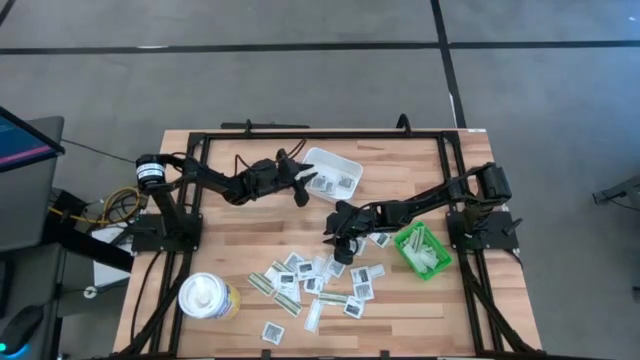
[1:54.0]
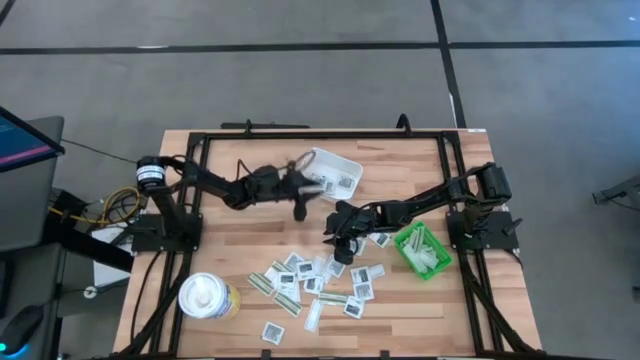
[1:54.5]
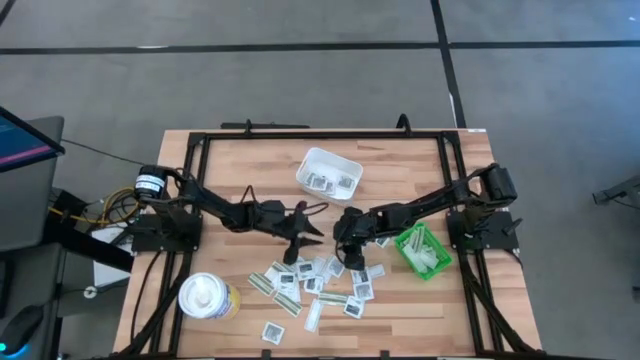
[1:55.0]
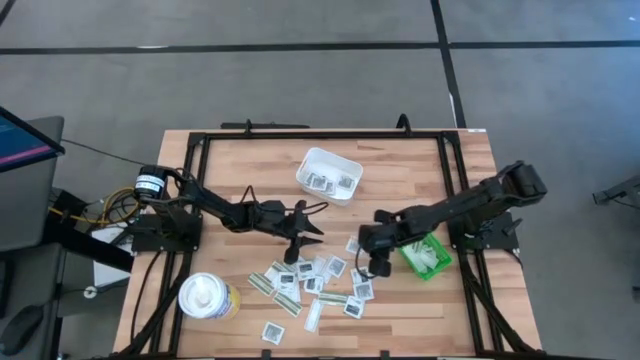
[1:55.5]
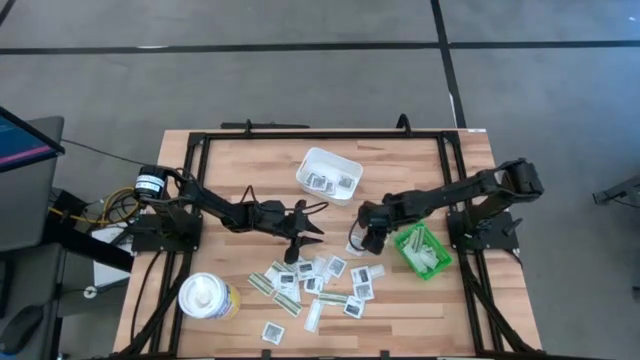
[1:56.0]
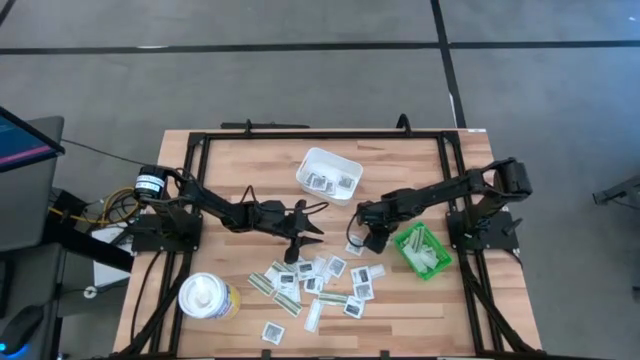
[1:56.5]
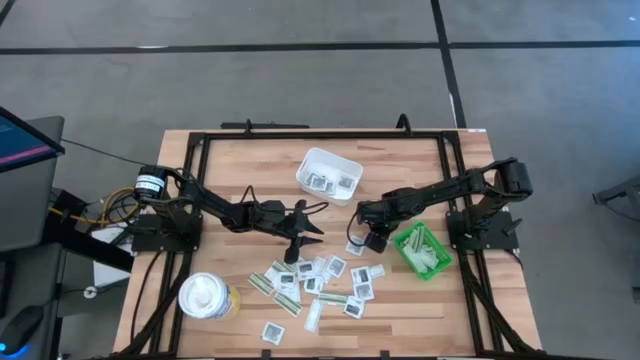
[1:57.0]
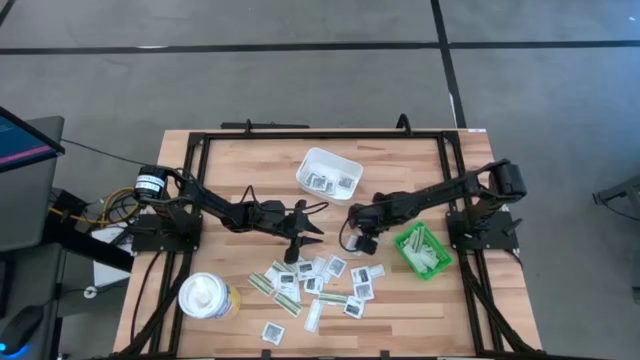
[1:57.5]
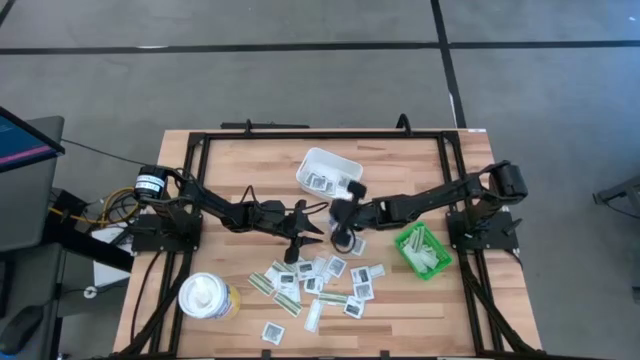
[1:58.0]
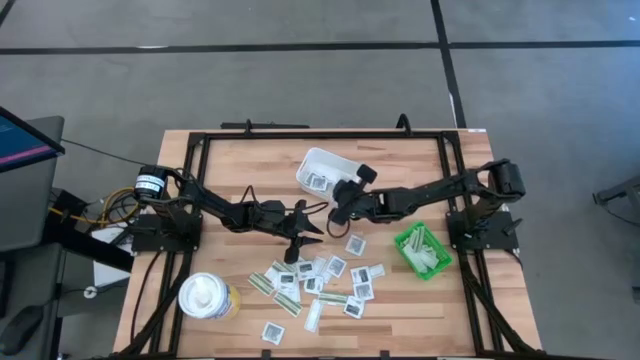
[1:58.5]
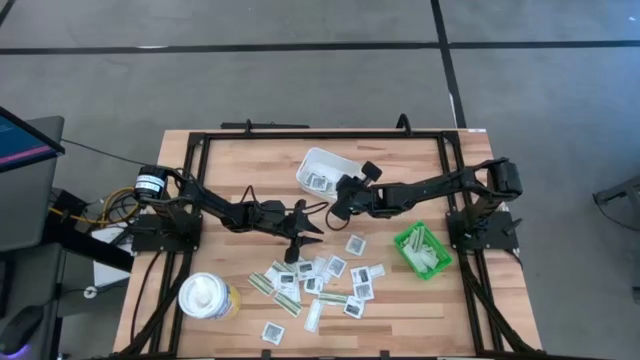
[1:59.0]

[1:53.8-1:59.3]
Task: Pick & Place First Aid Supplies
Put the towelette pack into the white bin

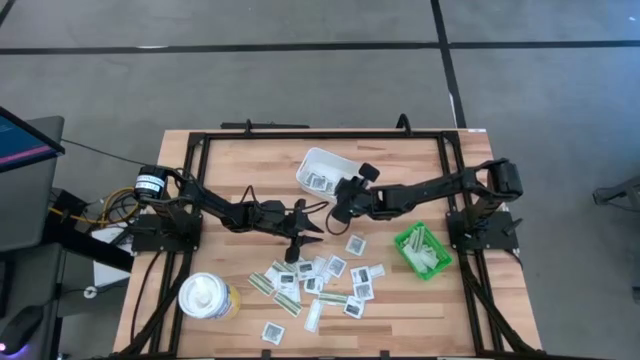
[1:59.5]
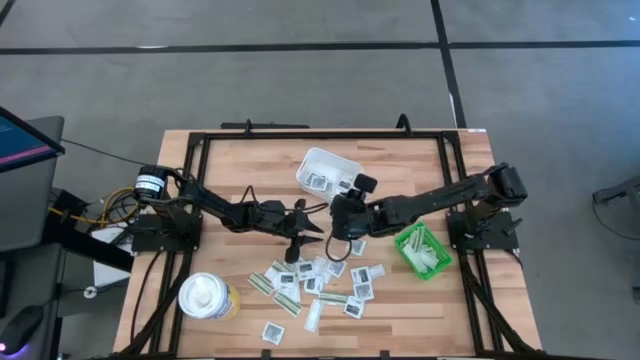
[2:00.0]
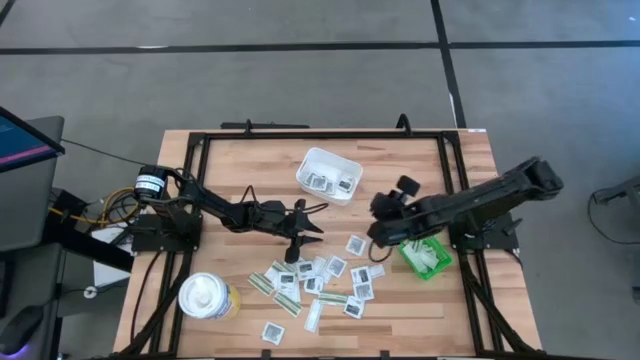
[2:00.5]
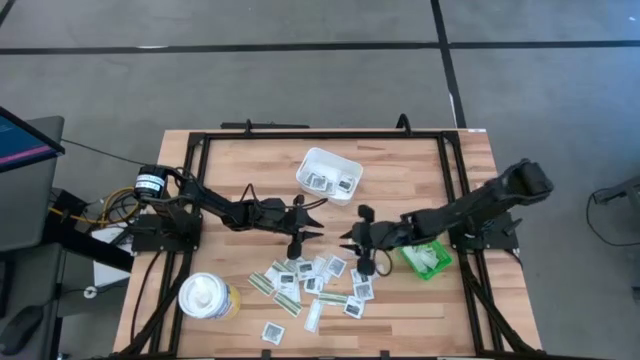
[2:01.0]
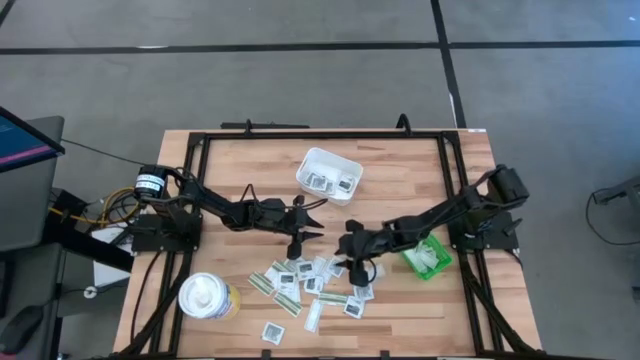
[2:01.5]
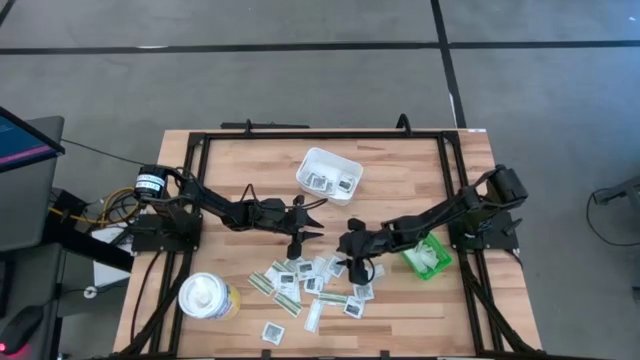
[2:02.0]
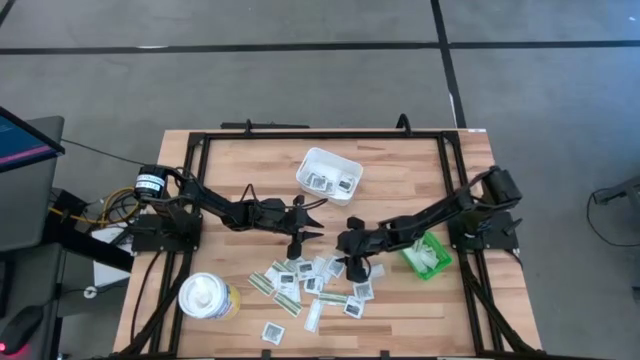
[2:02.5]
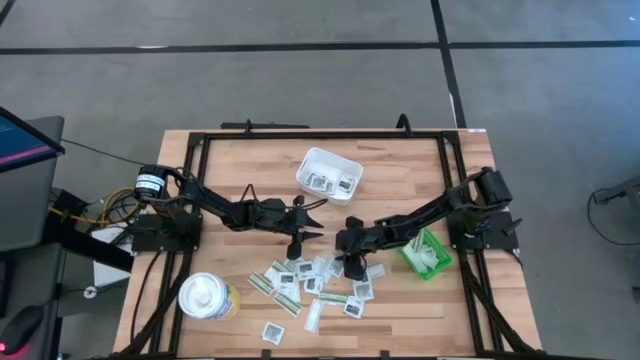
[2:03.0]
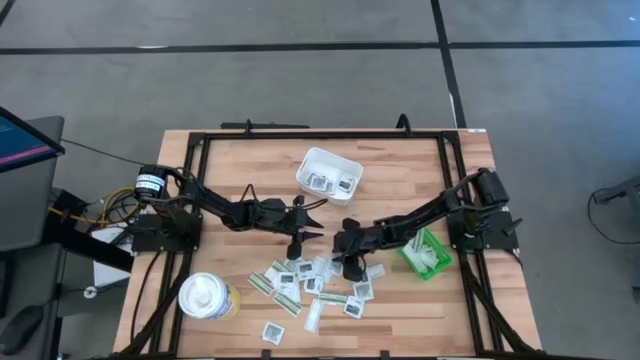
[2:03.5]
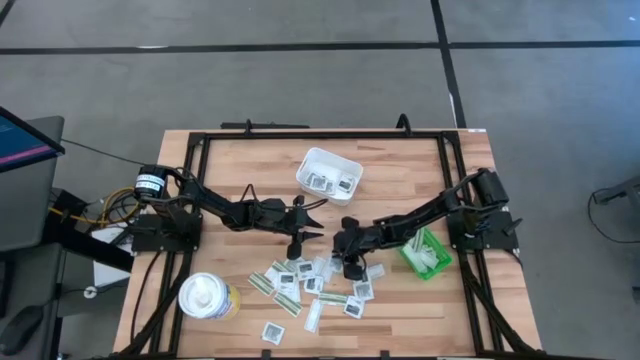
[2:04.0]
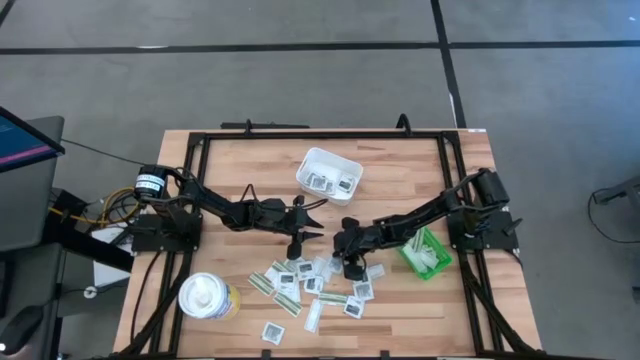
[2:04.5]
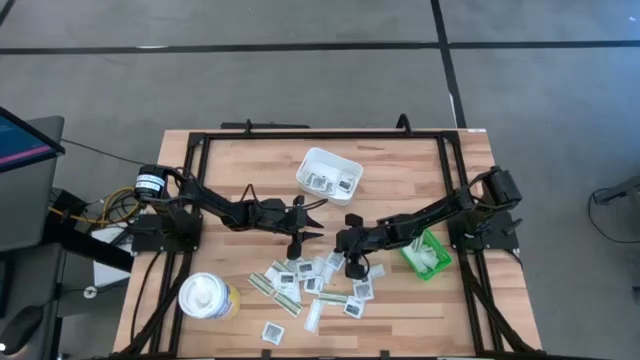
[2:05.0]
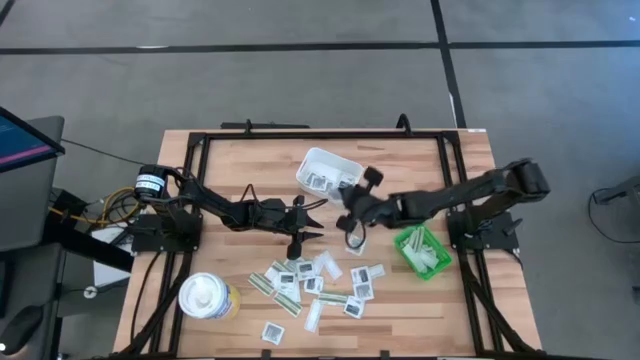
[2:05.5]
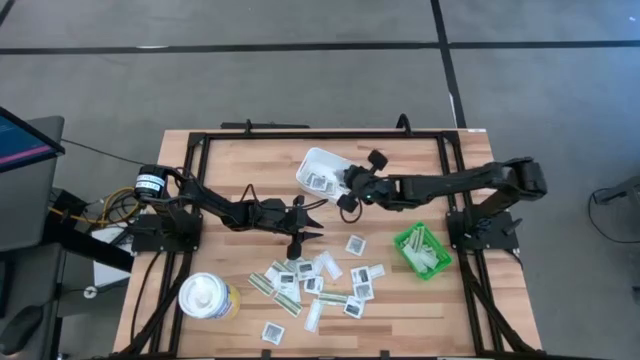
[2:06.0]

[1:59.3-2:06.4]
Put the towelette pack into the white bin

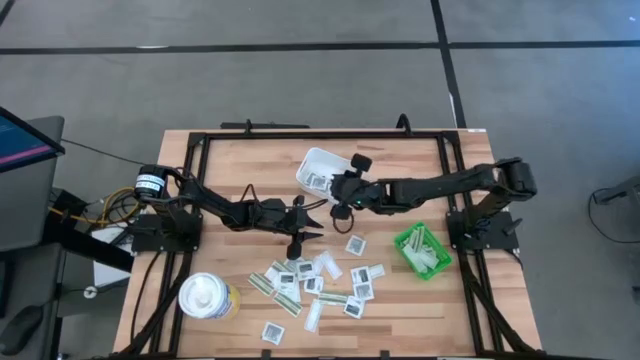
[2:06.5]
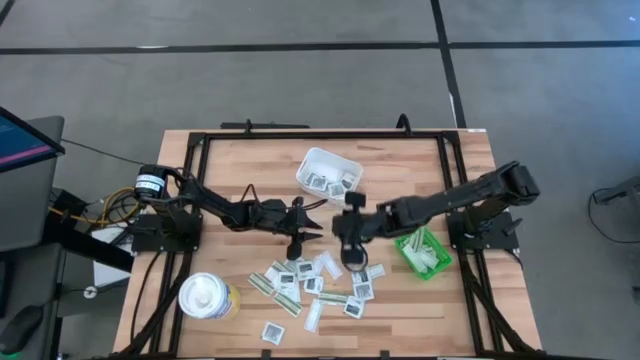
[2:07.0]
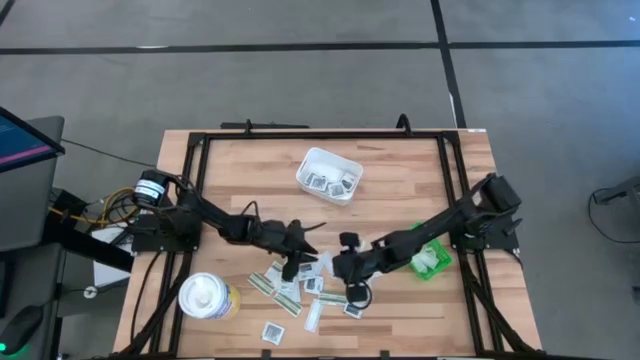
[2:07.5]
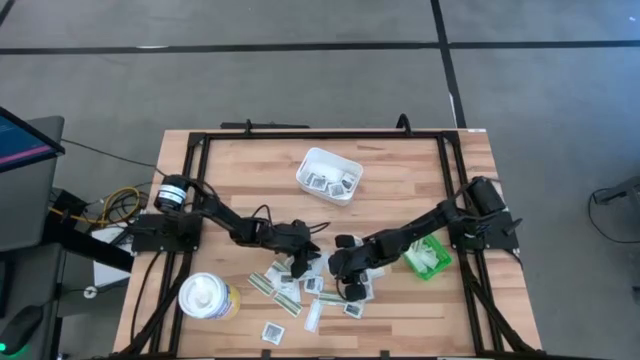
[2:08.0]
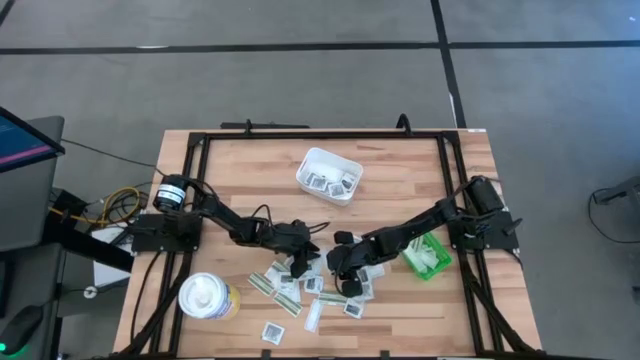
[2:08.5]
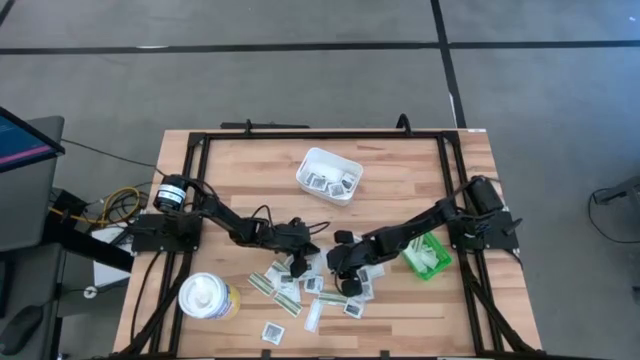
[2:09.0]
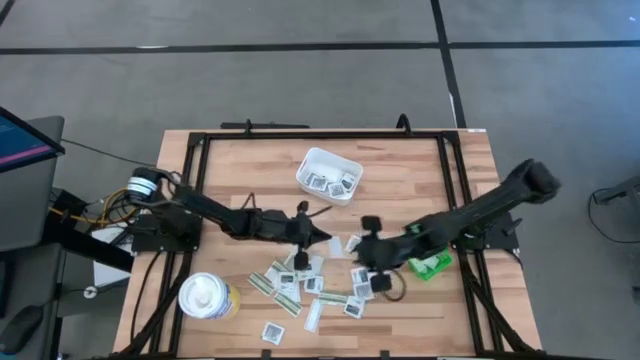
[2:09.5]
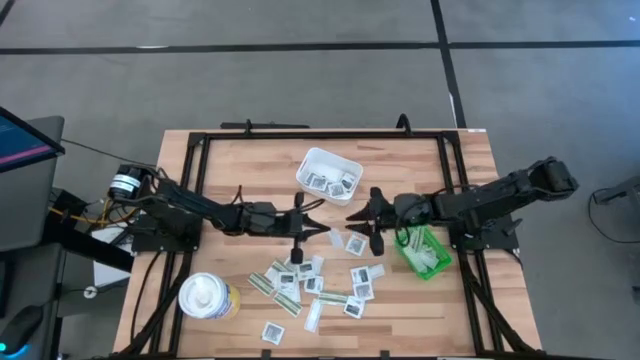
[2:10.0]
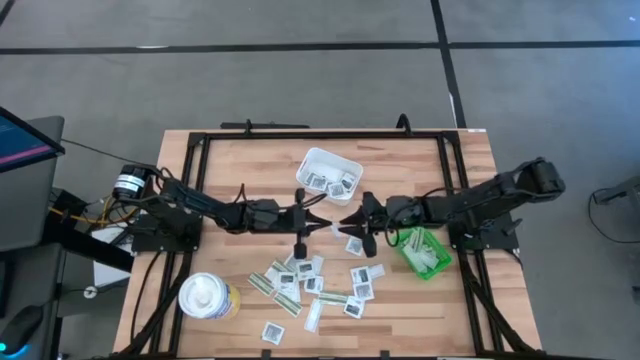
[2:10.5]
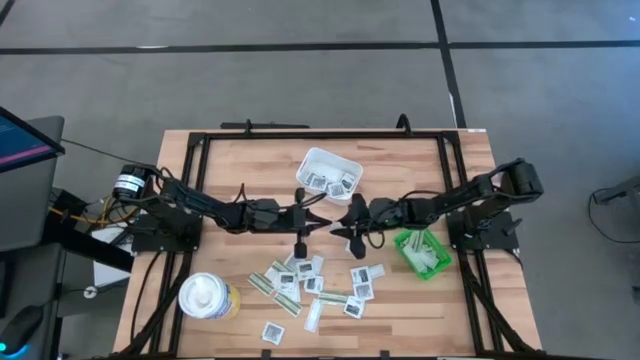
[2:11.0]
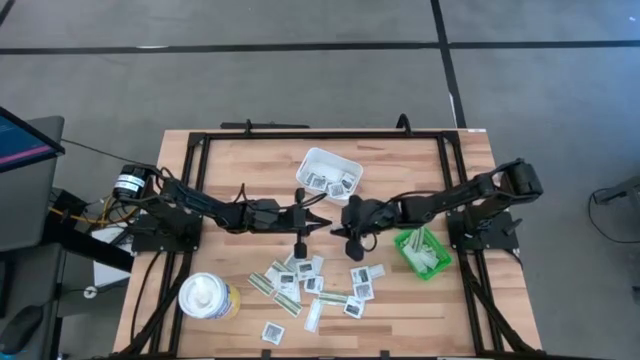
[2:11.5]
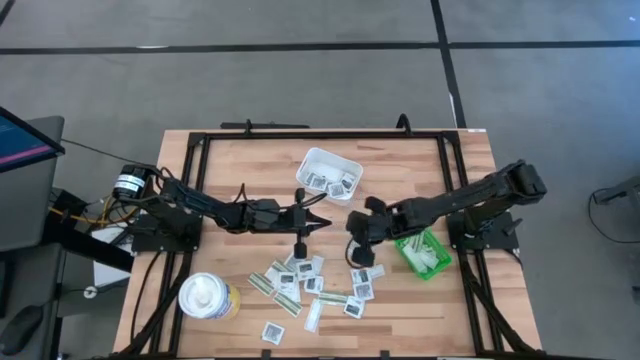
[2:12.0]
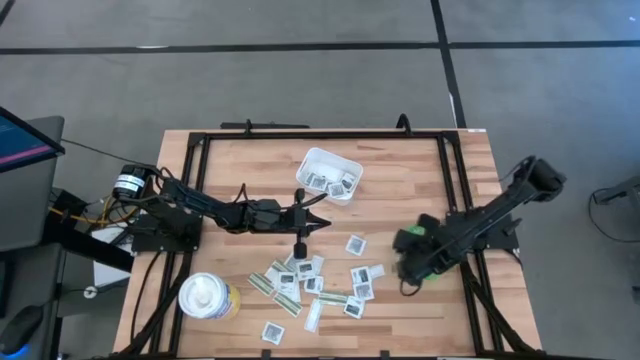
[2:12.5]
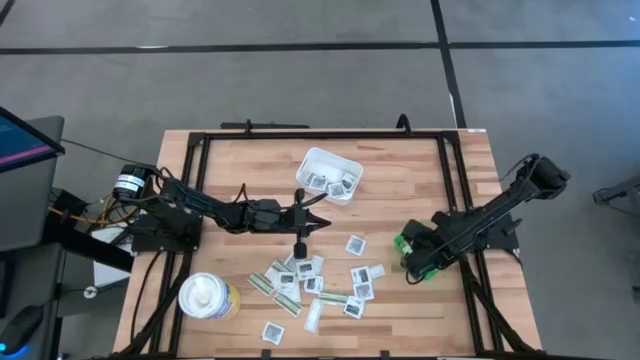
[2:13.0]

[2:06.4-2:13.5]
Put the bandage pack into the green bin

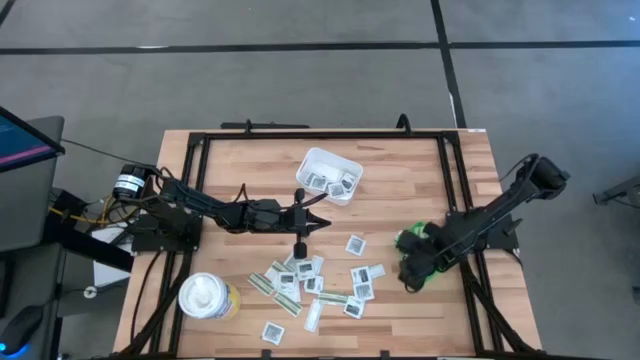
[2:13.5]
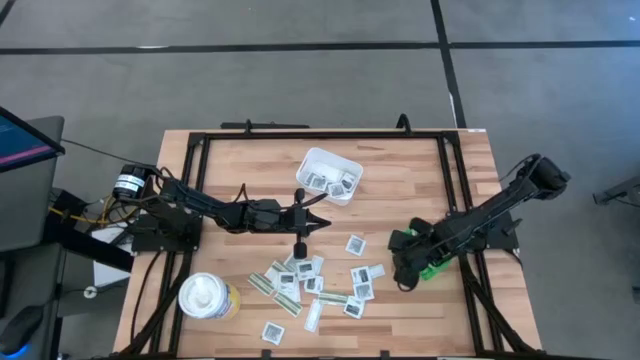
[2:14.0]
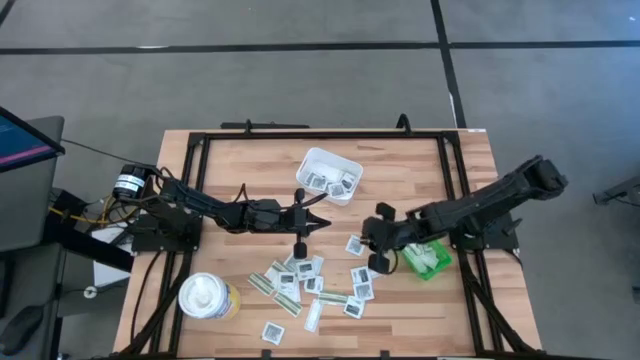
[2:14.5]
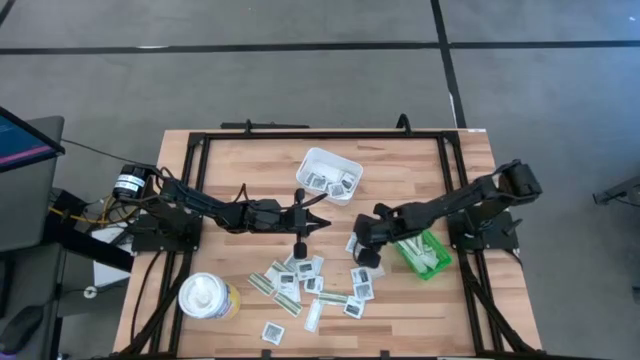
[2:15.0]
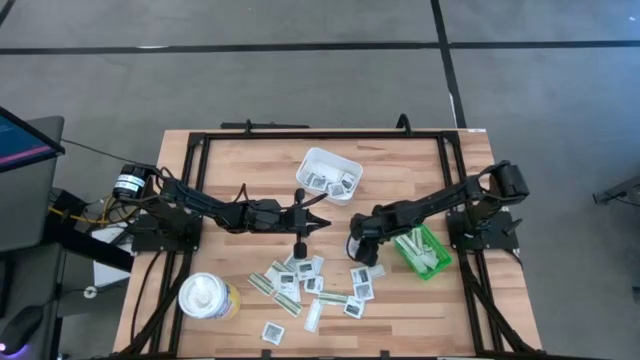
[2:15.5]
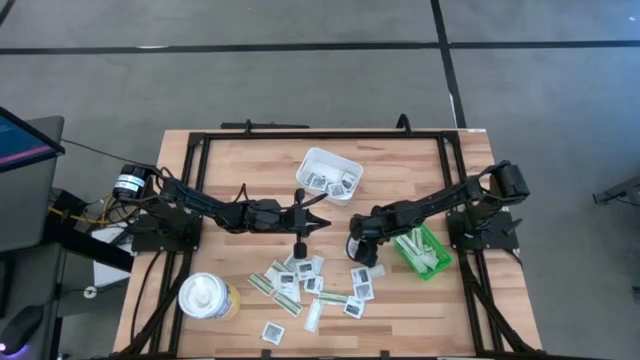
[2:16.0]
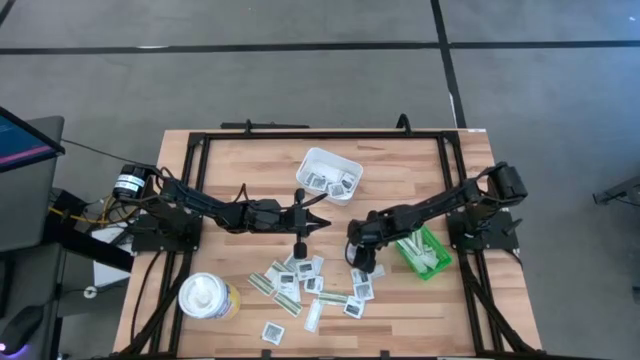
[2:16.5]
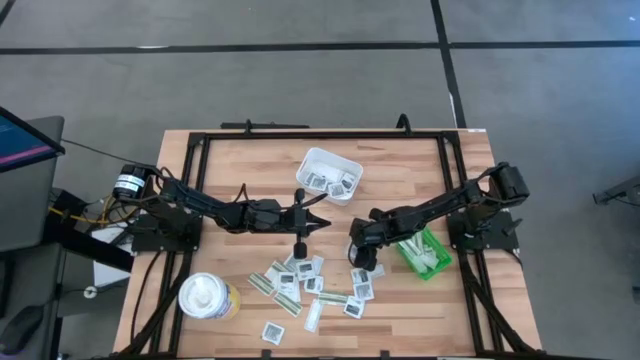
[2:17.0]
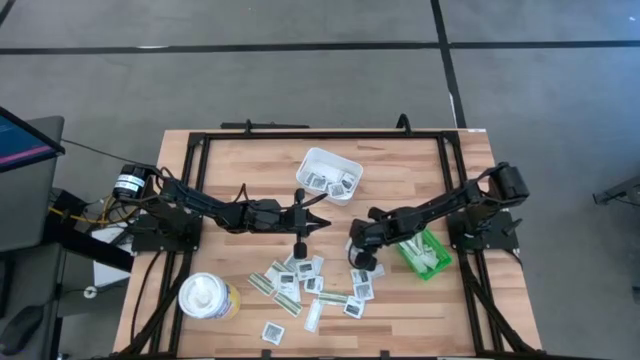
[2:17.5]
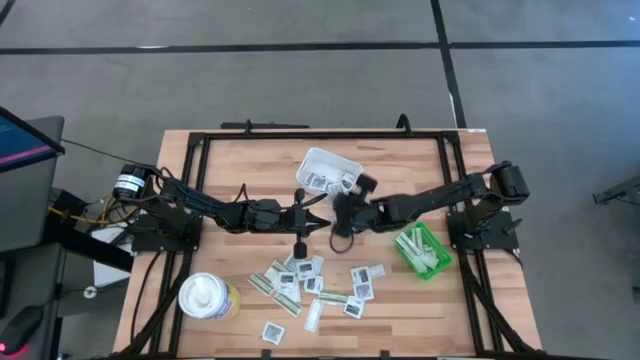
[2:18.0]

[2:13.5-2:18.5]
Put the towelette pack into the white bin
